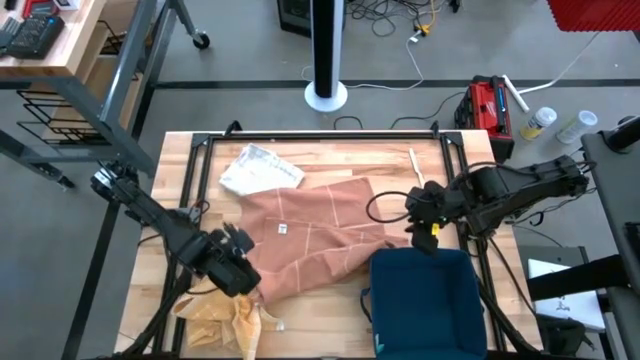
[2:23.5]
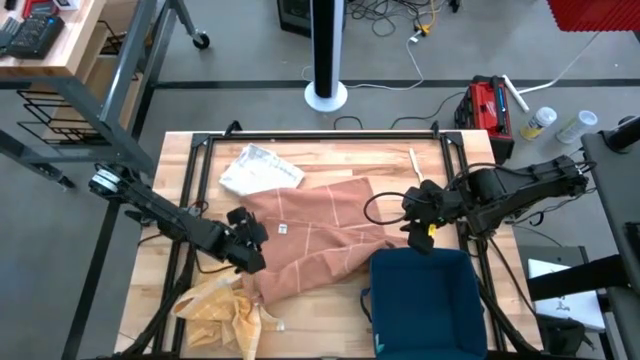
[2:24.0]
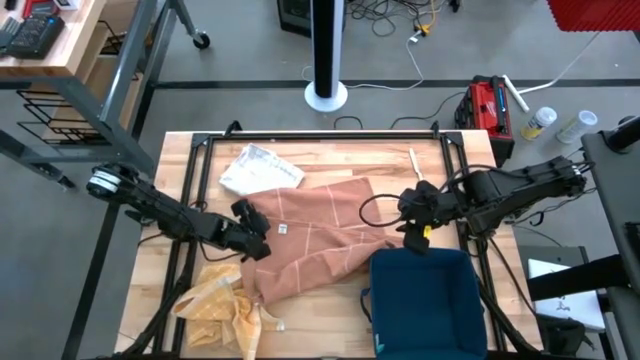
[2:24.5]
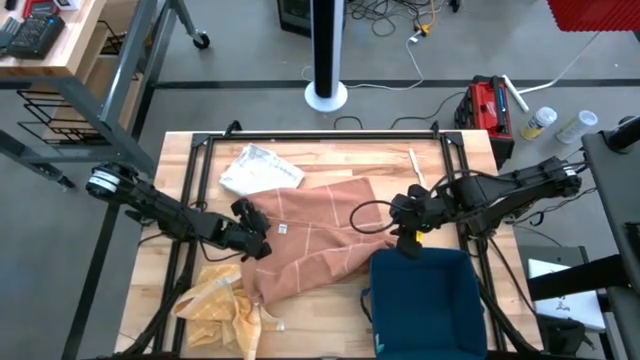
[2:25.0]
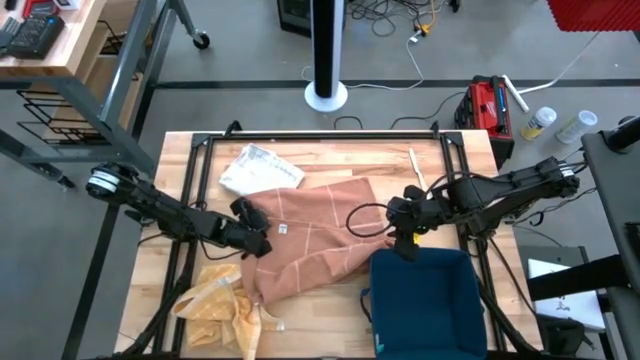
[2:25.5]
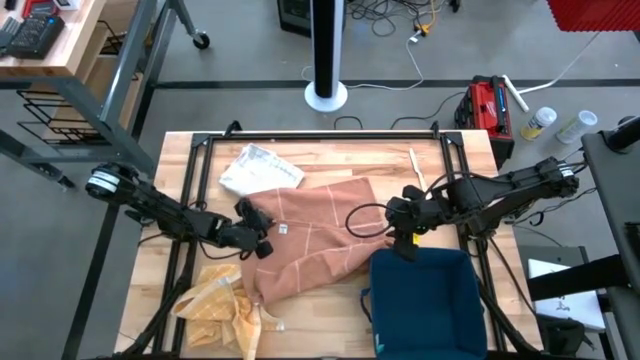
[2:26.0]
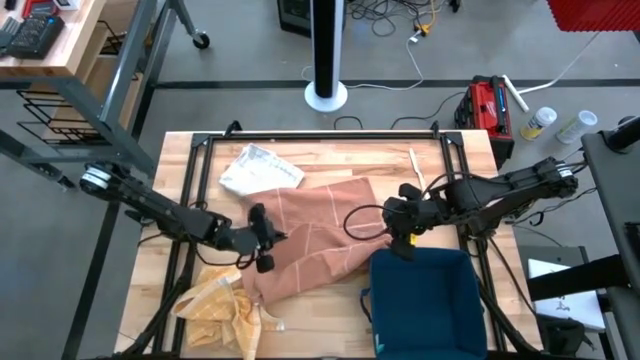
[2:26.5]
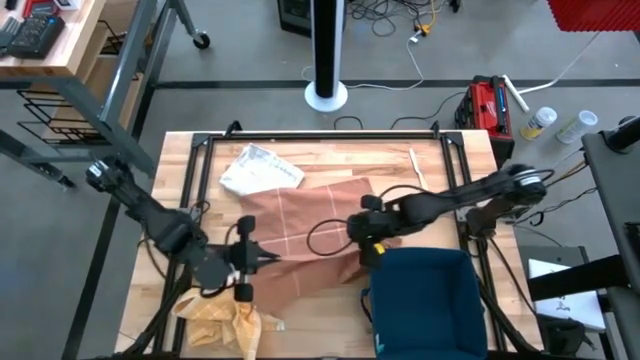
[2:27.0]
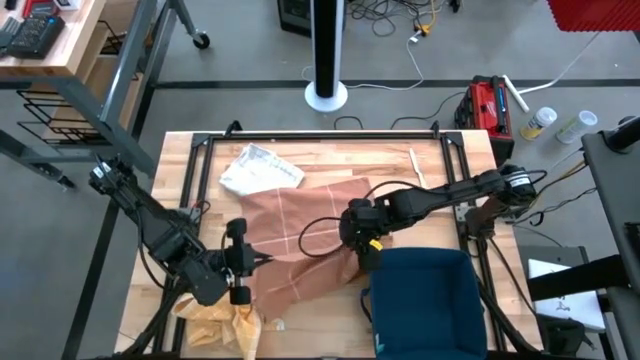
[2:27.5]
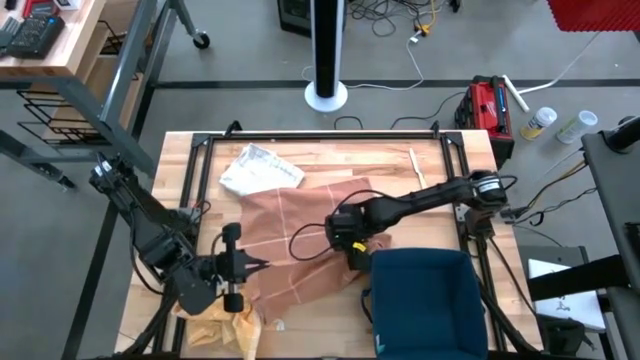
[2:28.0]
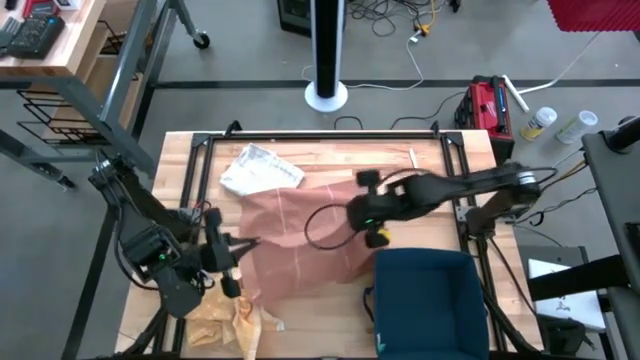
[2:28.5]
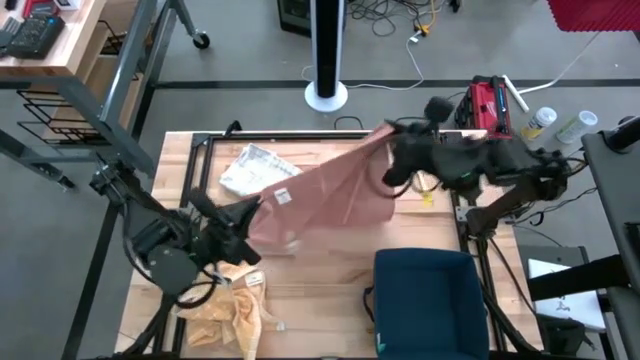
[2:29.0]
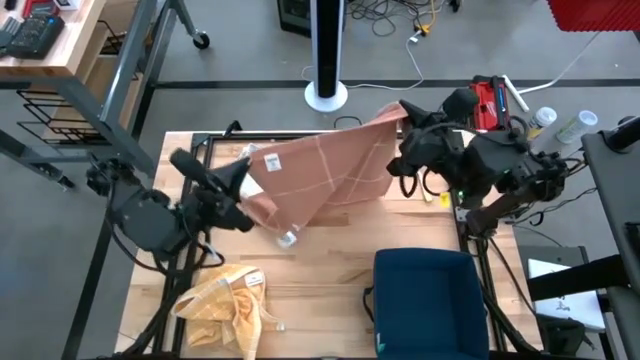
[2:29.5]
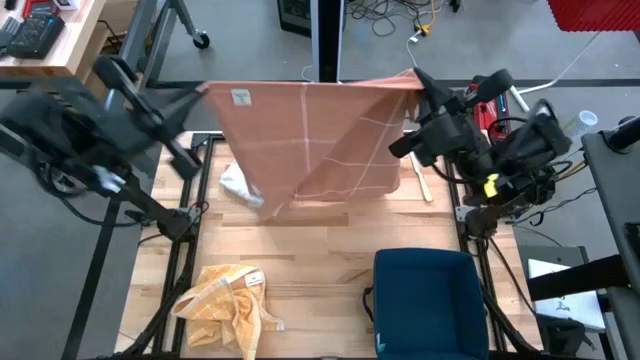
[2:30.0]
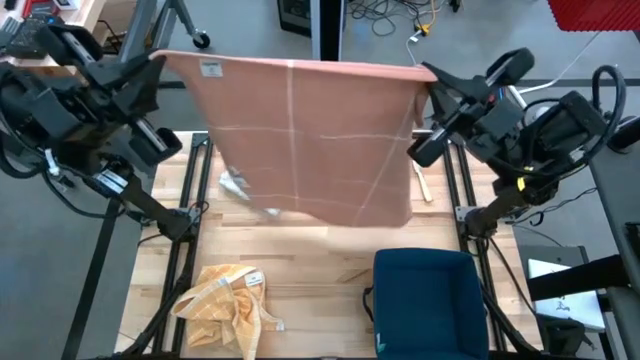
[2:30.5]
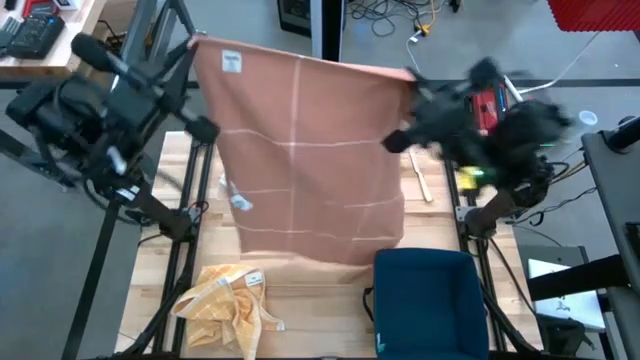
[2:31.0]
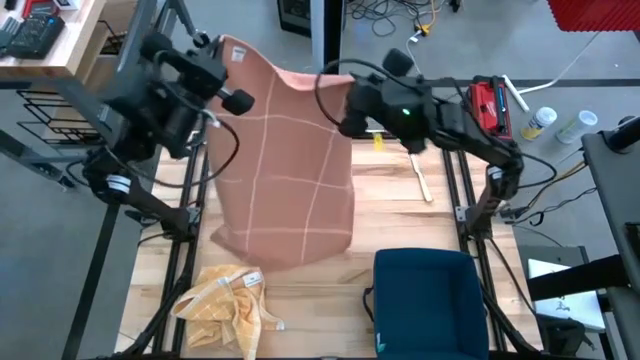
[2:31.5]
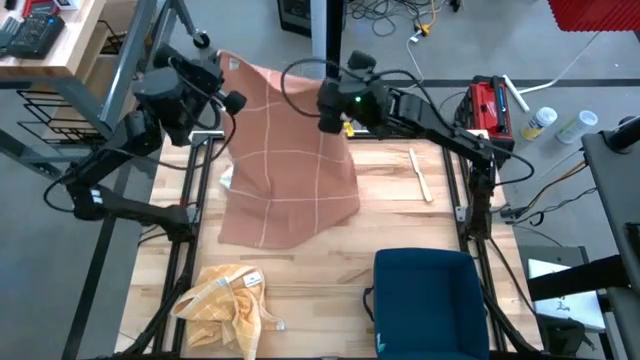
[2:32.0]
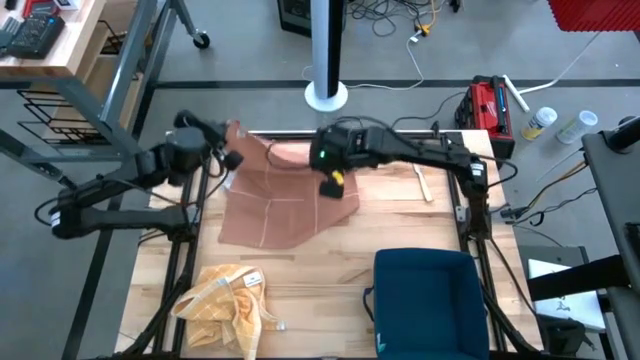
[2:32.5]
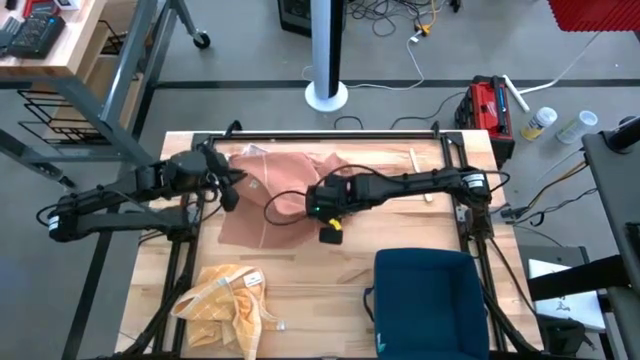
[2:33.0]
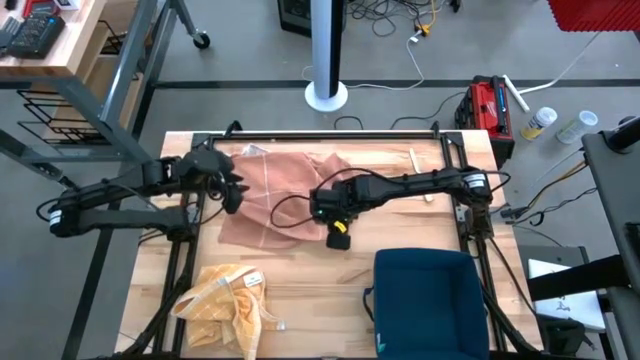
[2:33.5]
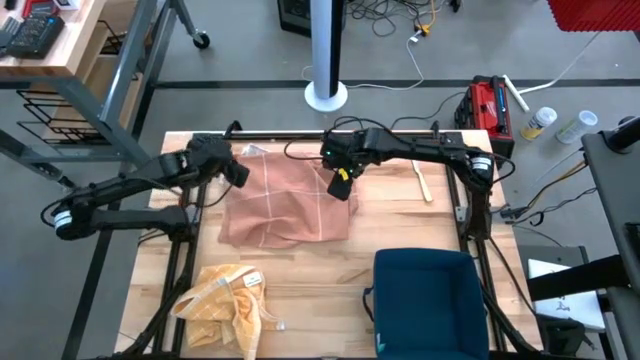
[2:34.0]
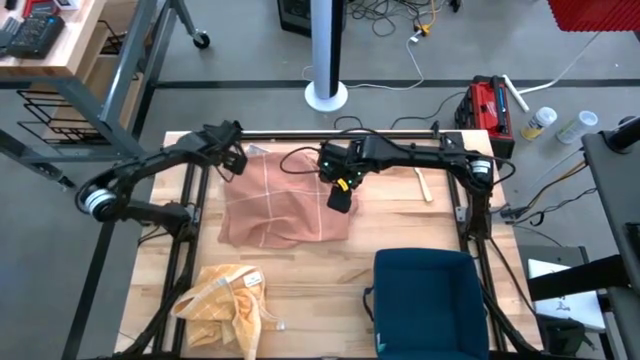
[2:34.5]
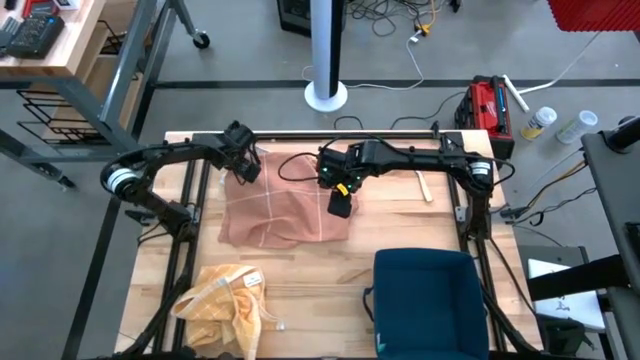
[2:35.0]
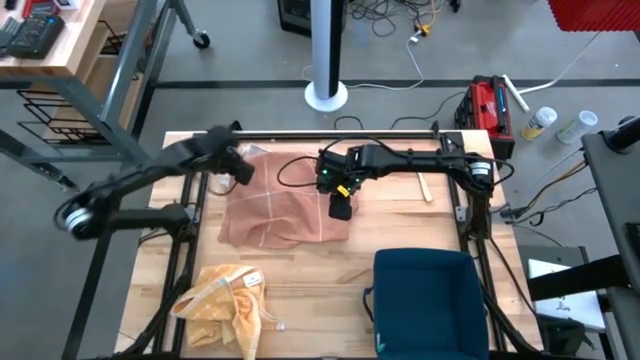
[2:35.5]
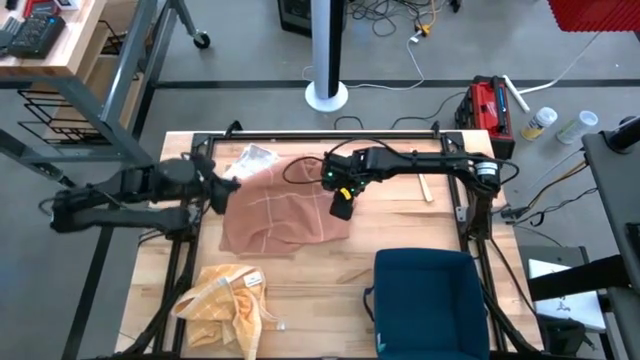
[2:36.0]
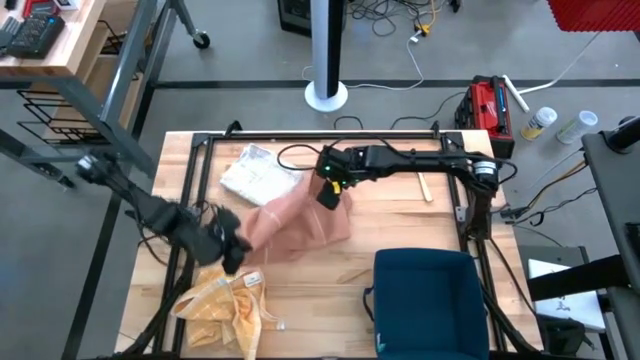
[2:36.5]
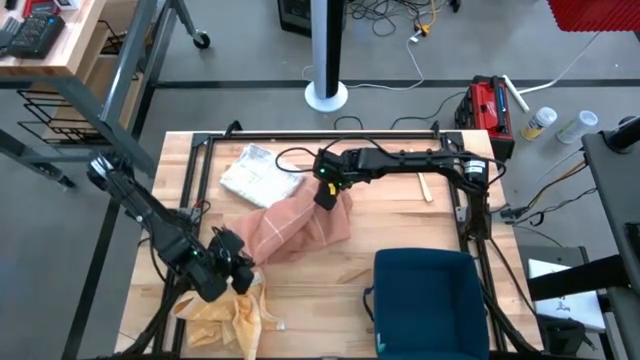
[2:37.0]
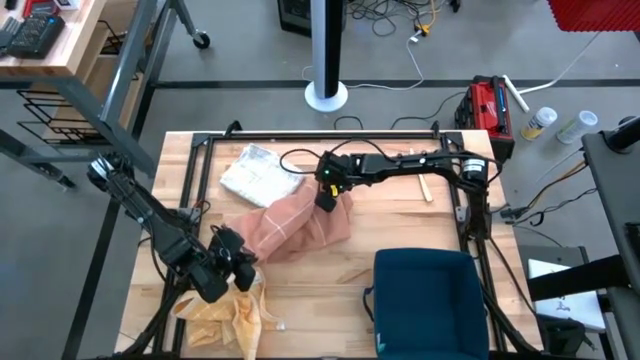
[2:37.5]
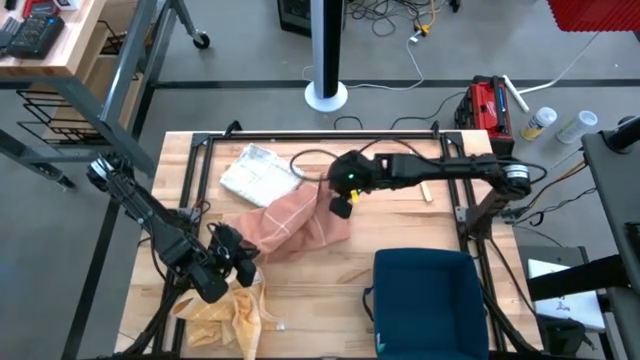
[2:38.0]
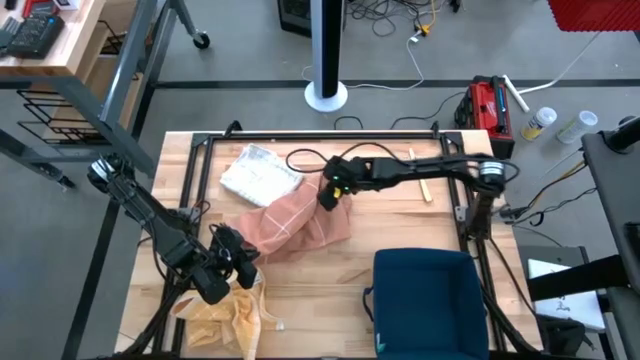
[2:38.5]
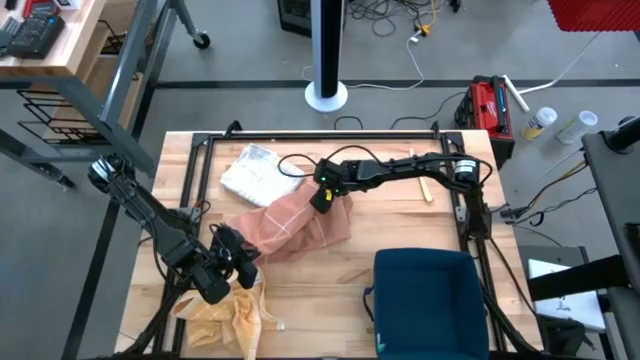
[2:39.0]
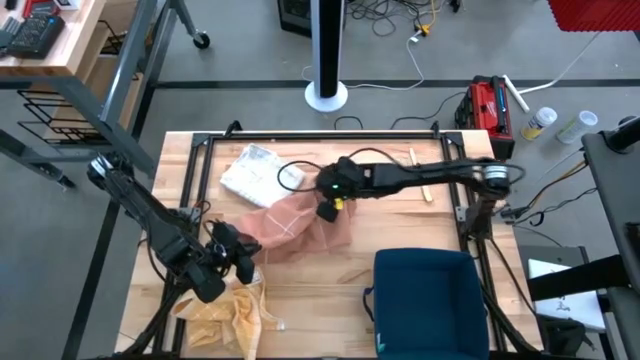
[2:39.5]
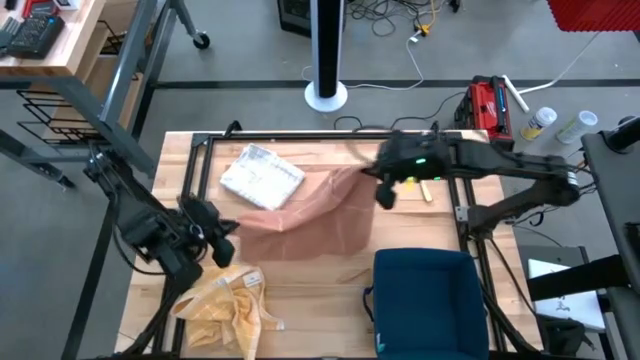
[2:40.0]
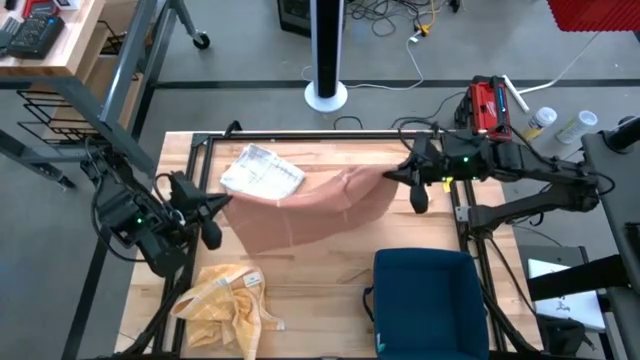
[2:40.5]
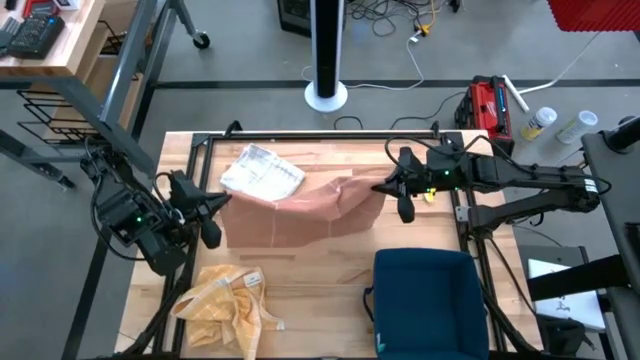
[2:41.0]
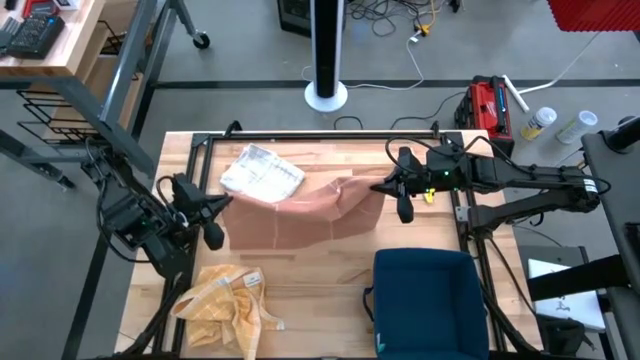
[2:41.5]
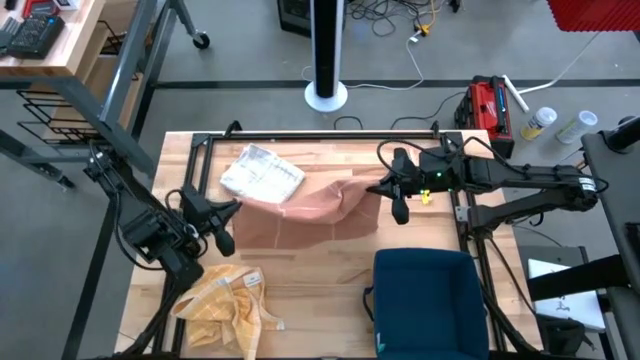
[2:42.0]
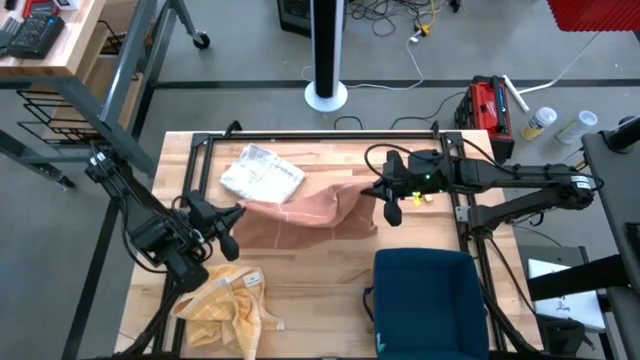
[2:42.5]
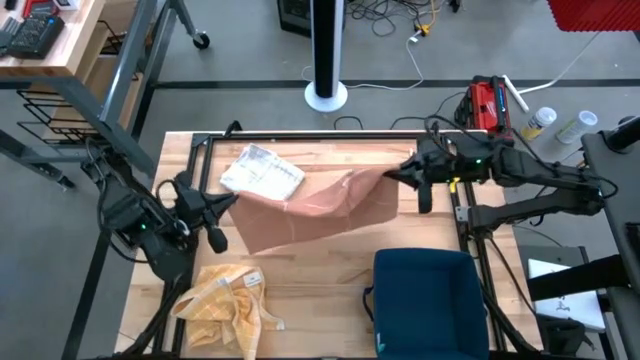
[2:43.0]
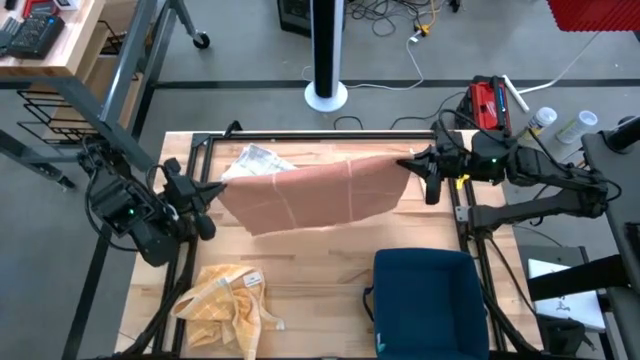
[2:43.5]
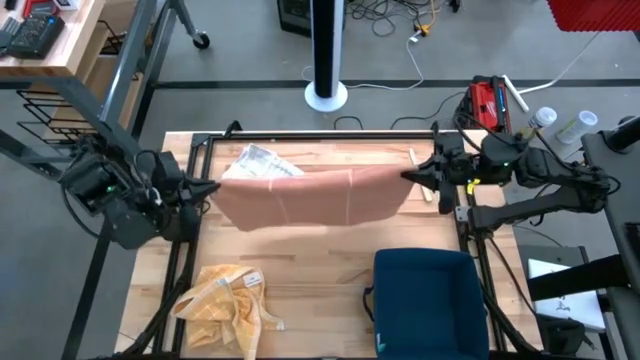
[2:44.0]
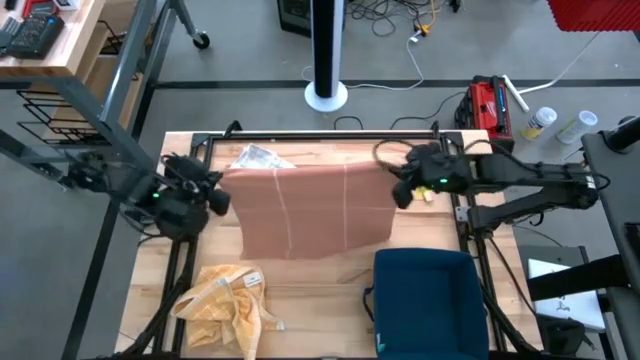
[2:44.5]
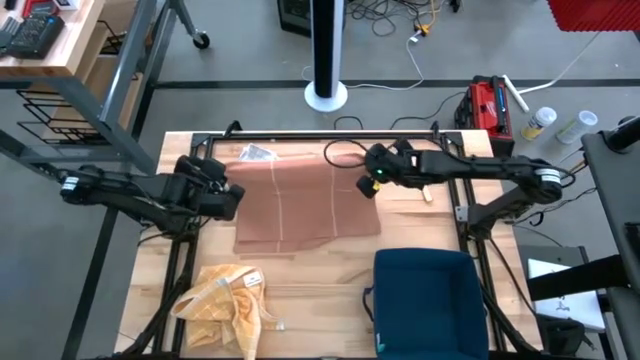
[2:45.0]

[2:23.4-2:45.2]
Task: Fold towel
Fold the brown towel
